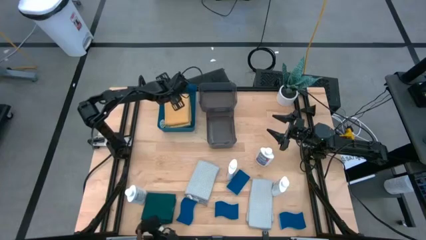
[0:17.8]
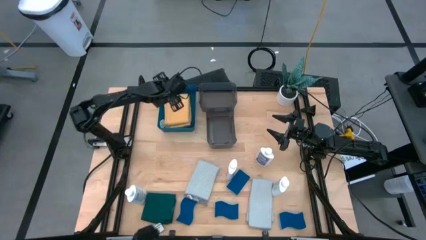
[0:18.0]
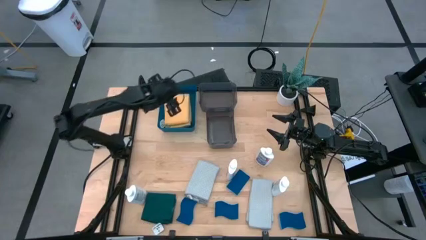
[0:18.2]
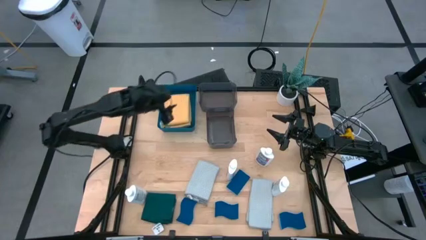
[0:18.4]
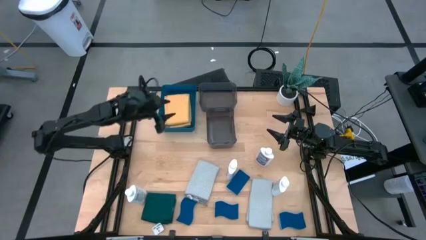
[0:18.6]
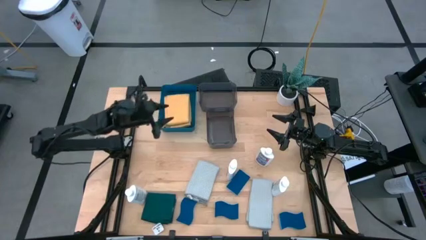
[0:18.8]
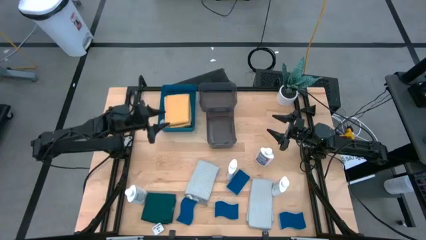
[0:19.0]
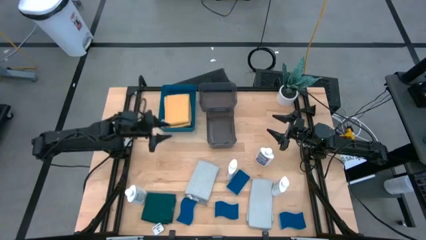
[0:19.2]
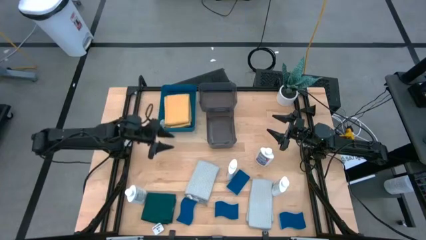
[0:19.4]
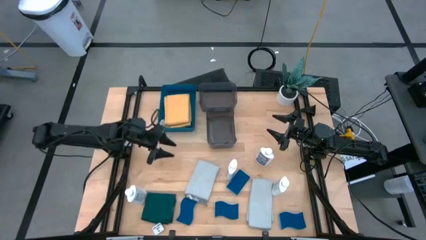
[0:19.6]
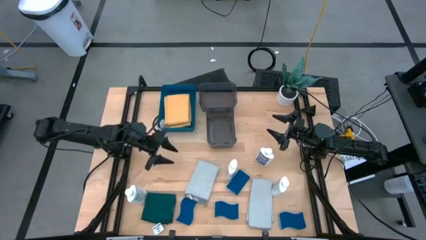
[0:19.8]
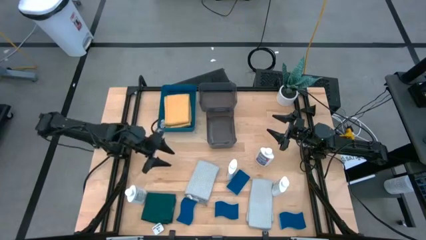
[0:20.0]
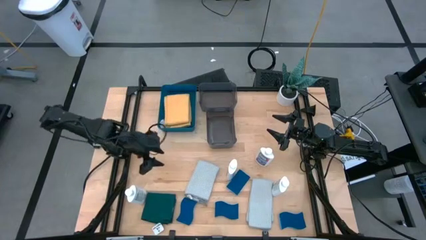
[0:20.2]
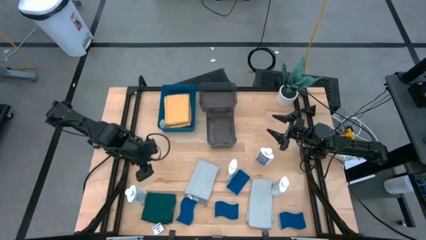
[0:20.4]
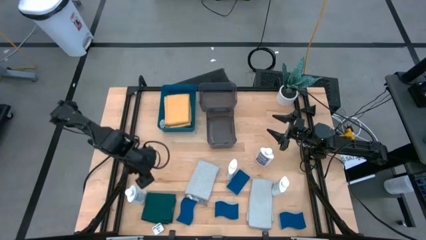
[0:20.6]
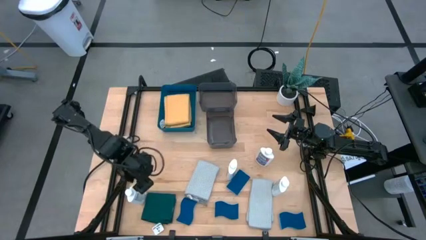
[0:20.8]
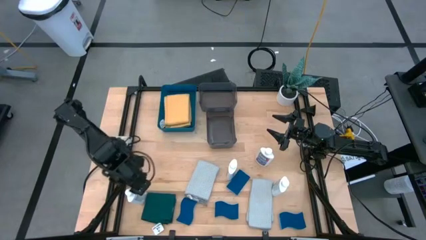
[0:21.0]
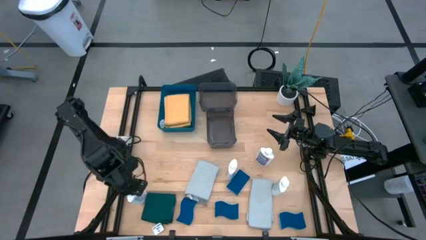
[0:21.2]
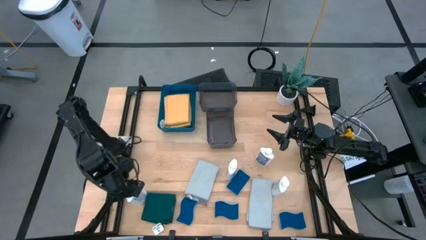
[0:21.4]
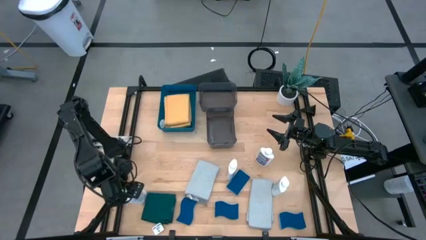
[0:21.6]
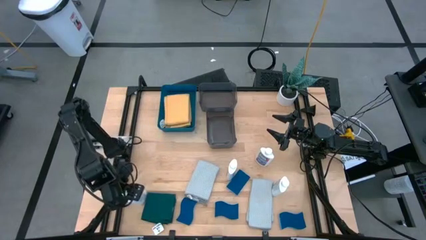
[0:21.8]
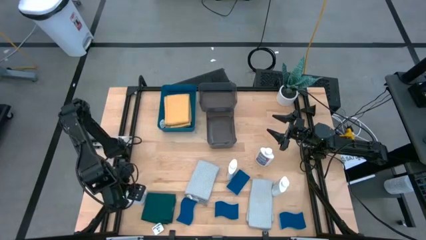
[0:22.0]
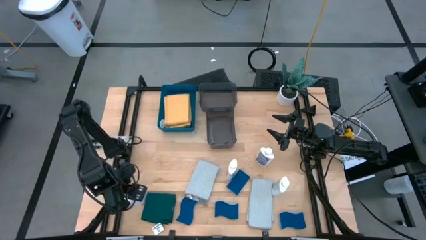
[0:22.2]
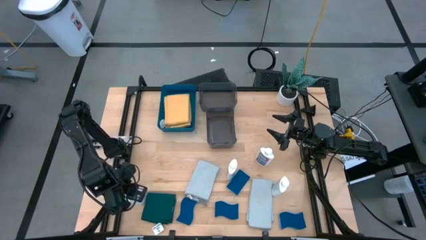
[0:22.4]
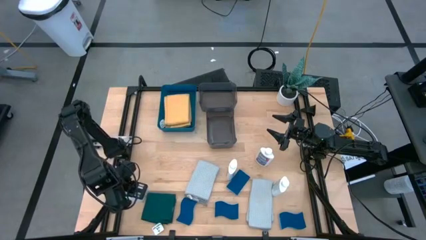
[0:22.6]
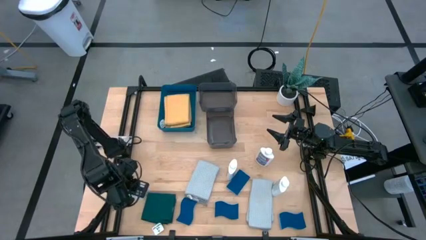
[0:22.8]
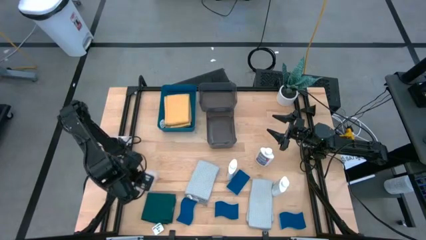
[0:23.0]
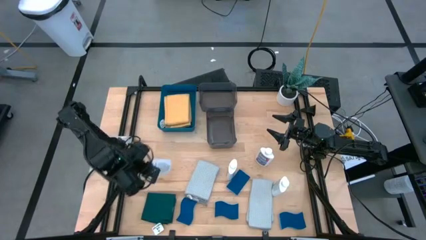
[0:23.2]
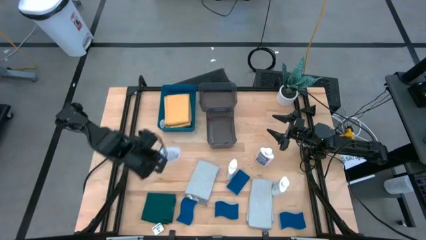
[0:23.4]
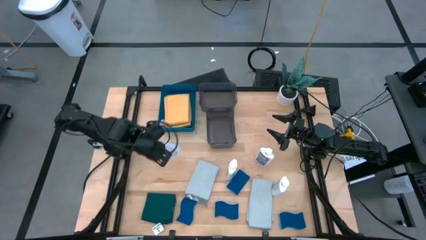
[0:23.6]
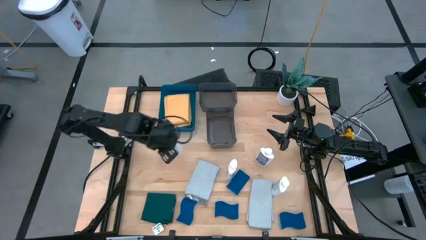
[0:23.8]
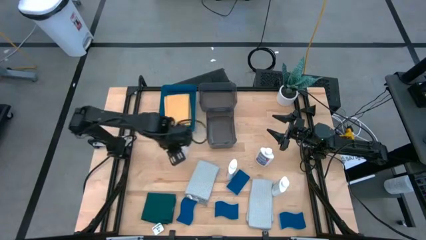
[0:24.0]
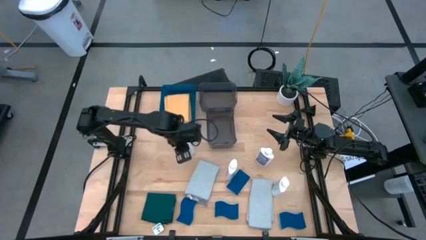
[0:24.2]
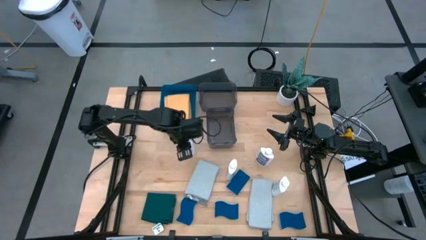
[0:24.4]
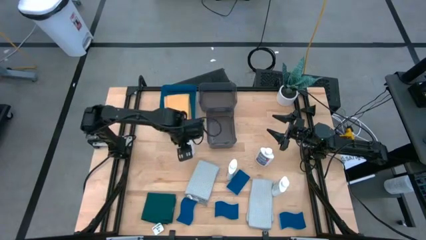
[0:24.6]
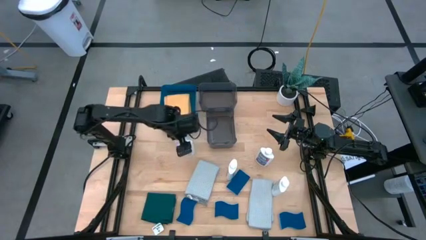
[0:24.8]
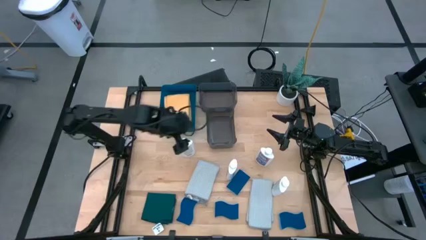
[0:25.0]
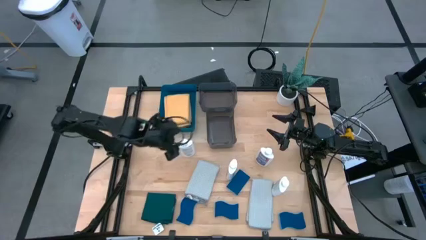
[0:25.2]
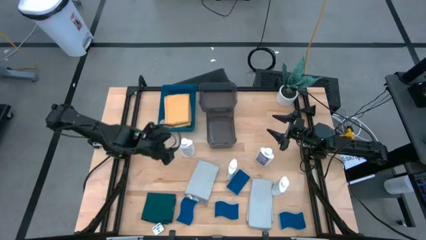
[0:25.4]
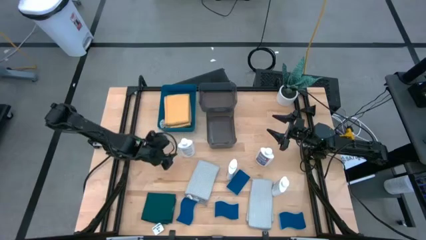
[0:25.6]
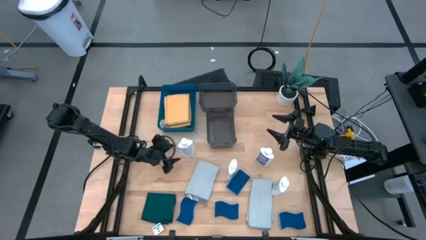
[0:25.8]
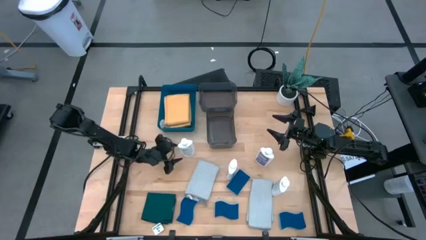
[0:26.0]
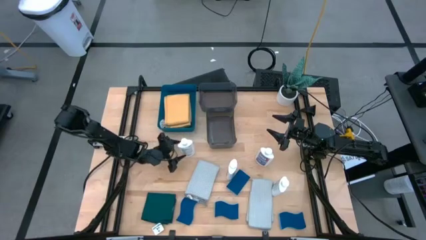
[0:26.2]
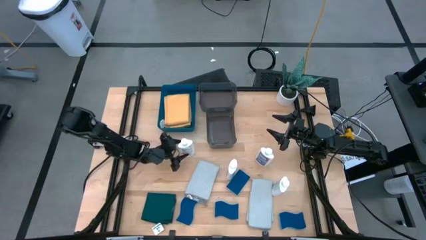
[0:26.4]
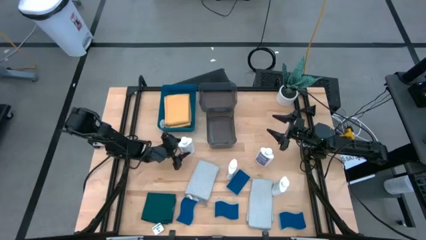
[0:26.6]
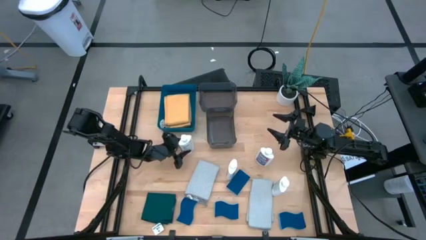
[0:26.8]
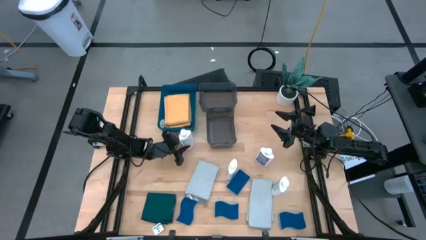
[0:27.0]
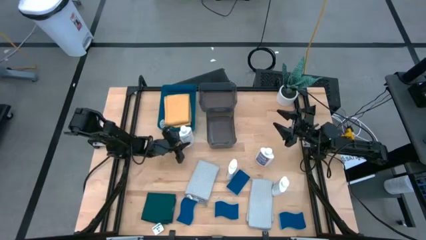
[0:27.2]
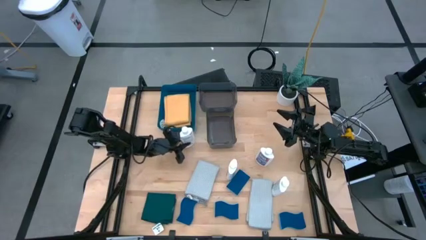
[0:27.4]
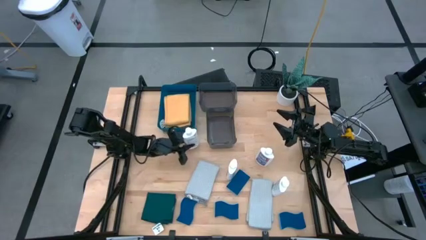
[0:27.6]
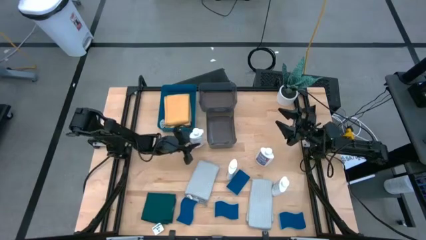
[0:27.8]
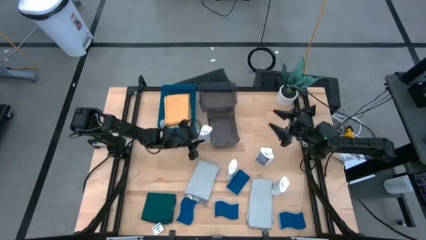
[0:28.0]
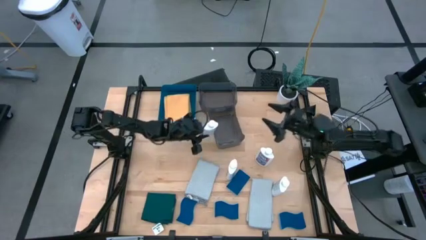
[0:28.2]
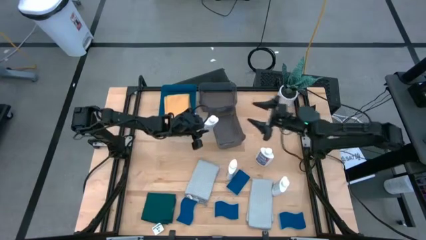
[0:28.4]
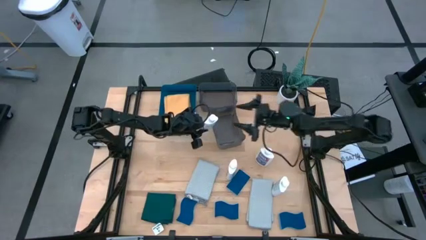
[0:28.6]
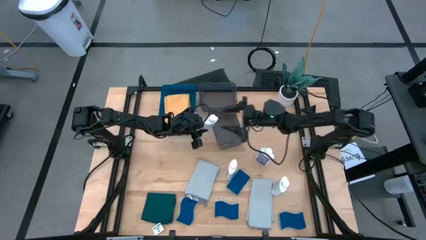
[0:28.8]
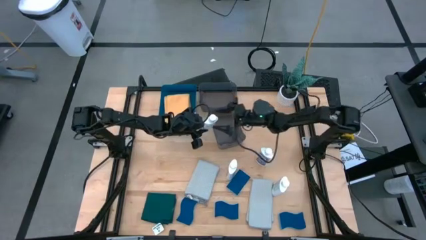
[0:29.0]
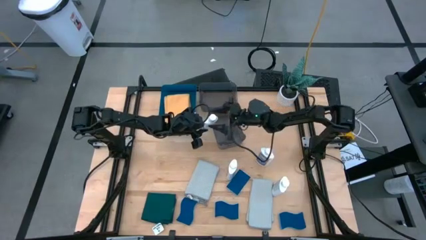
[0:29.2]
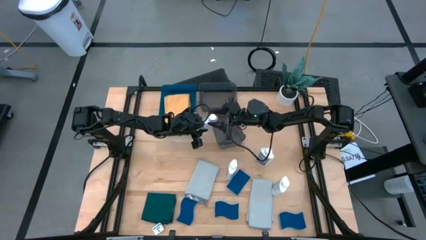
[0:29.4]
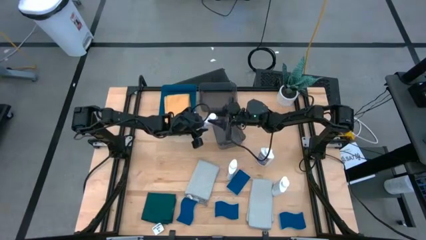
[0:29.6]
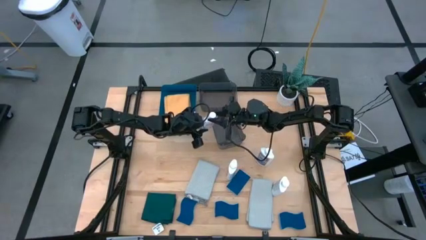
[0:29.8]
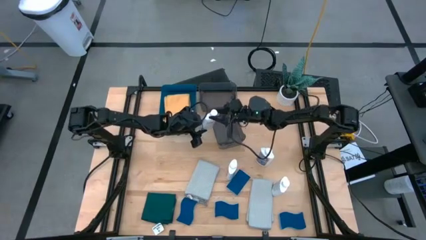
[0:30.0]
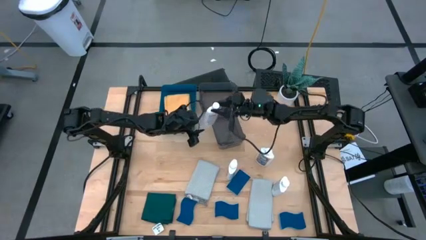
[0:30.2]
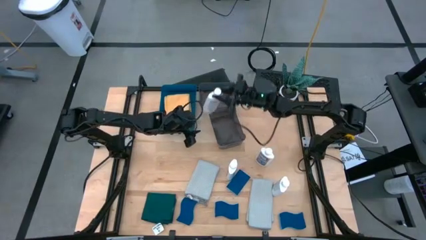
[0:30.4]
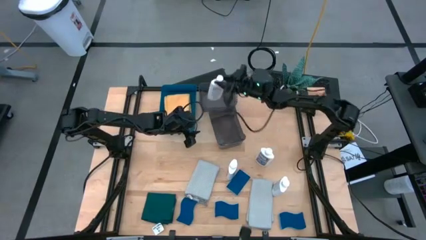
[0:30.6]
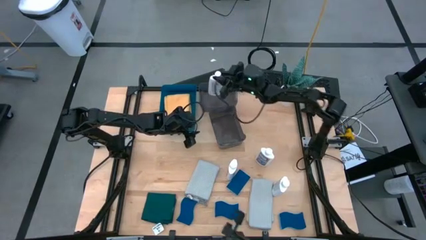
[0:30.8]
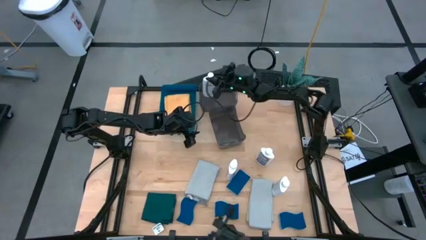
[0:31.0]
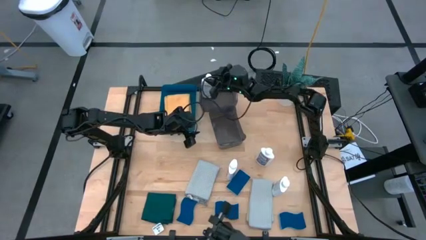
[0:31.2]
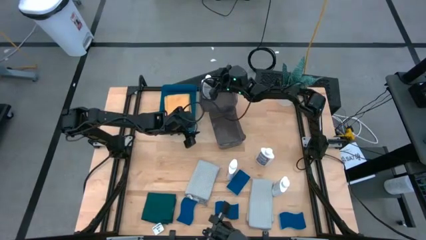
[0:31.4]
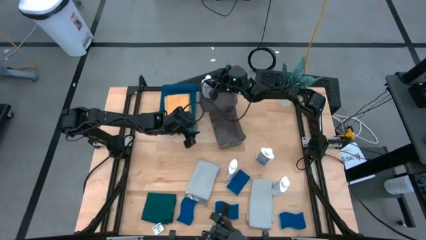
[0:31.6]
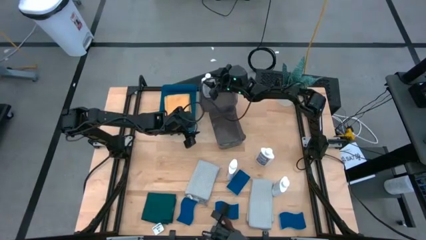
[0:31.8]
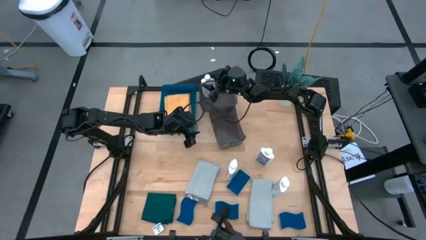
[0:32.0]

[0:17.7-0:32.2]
Task: Pick & Place Kitchen Items
Put the white plastic restorer bottle into the top black bin

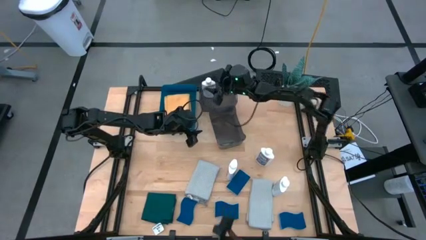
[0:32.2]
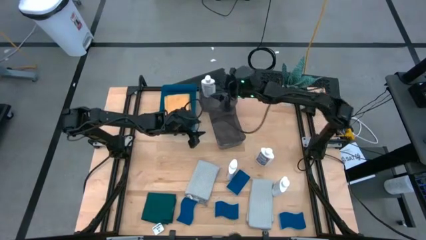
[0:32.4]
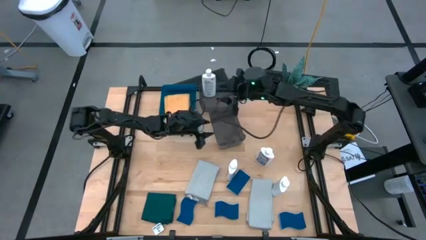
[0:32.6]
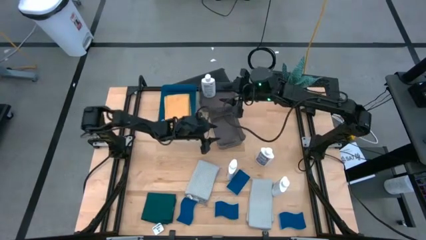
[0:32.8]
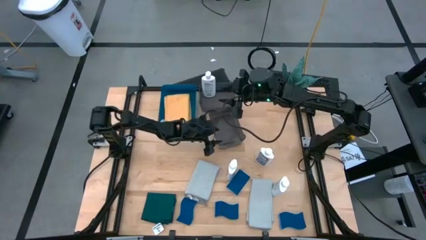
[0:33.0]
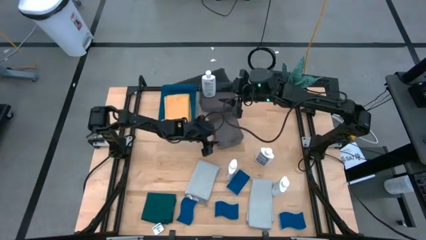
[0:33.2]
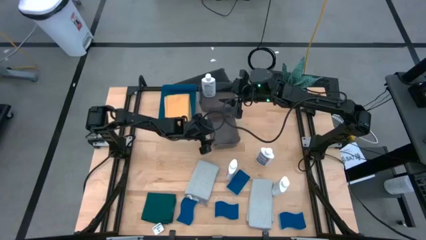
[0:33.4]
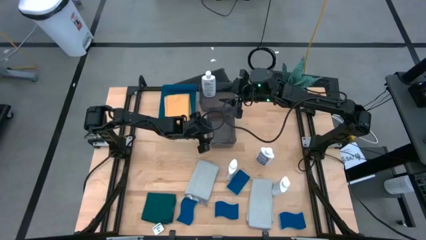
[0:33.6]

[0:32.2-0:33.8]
Adjust the bottom black bin on the table
